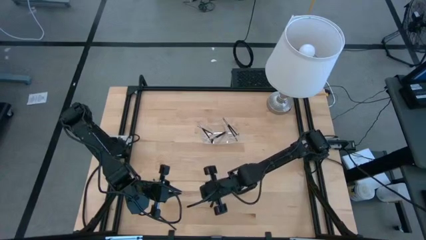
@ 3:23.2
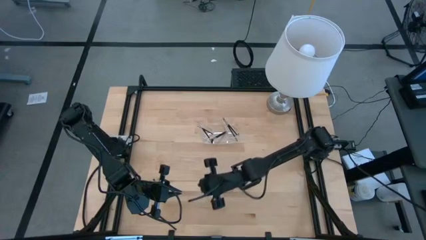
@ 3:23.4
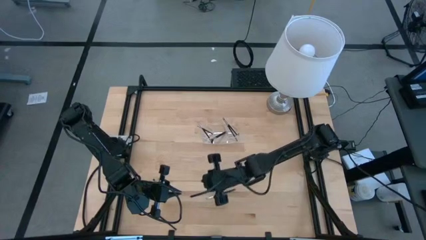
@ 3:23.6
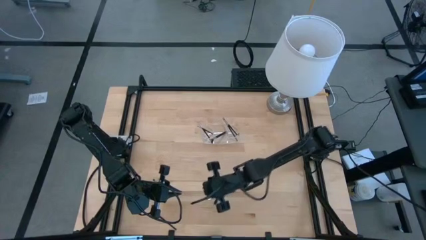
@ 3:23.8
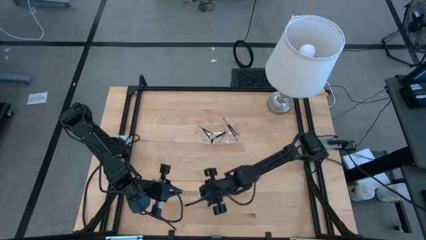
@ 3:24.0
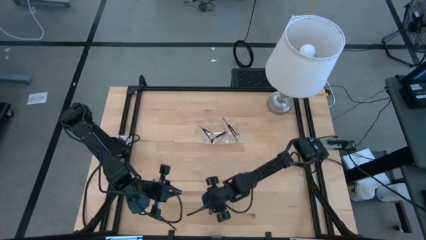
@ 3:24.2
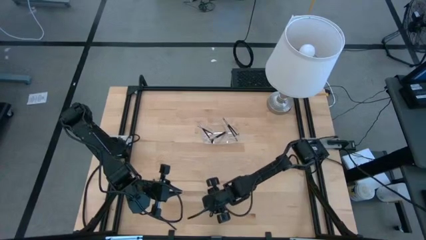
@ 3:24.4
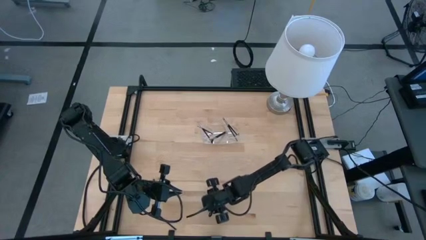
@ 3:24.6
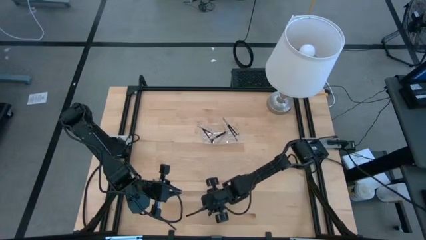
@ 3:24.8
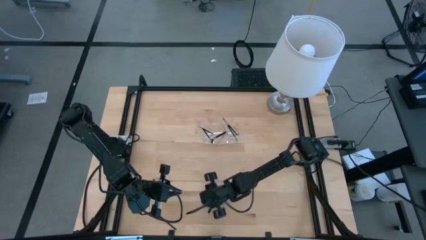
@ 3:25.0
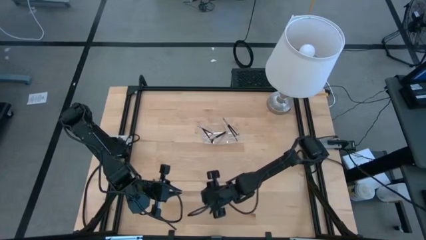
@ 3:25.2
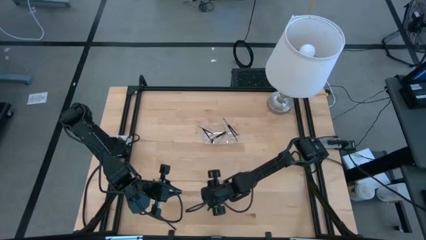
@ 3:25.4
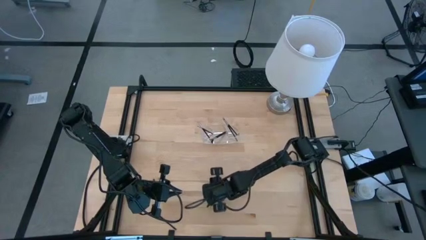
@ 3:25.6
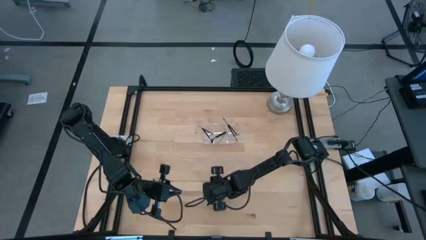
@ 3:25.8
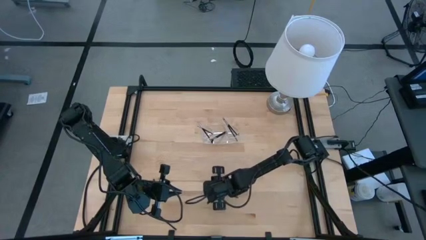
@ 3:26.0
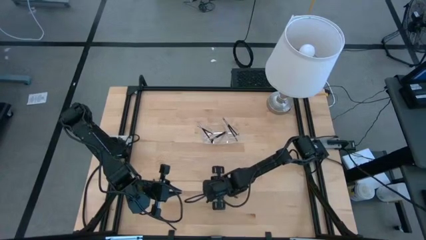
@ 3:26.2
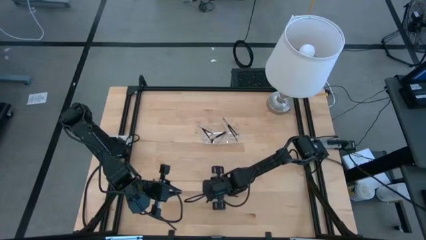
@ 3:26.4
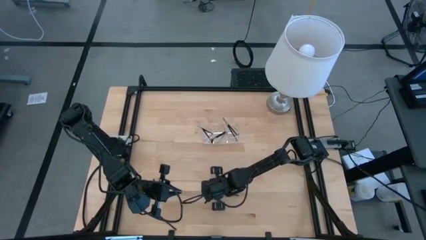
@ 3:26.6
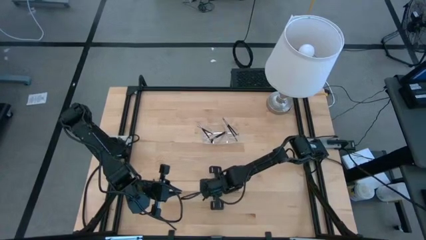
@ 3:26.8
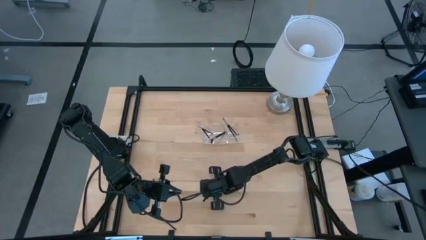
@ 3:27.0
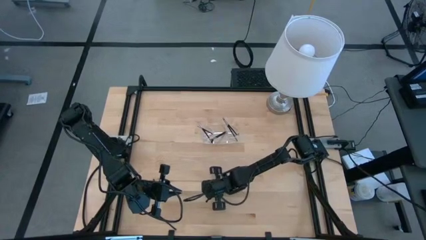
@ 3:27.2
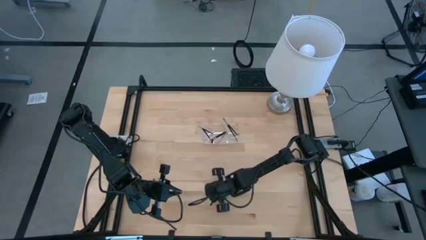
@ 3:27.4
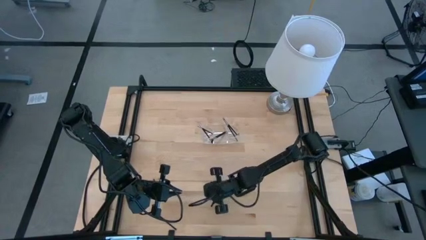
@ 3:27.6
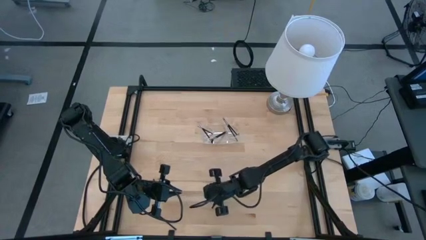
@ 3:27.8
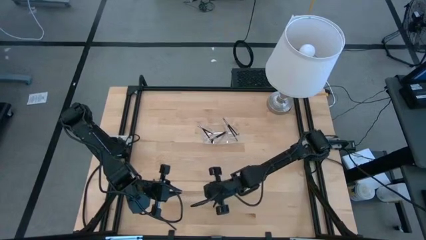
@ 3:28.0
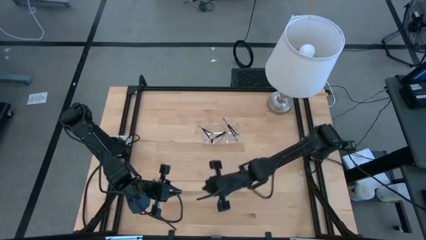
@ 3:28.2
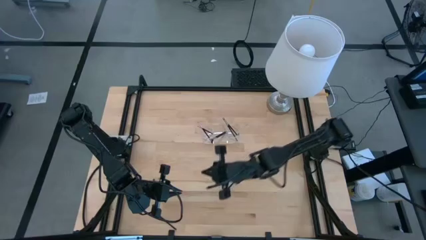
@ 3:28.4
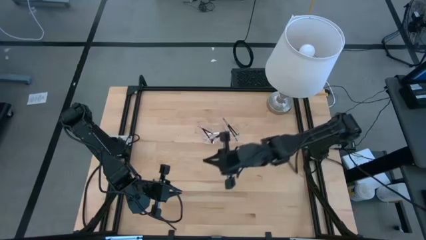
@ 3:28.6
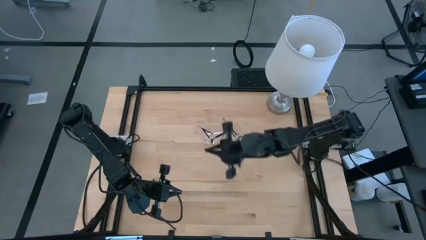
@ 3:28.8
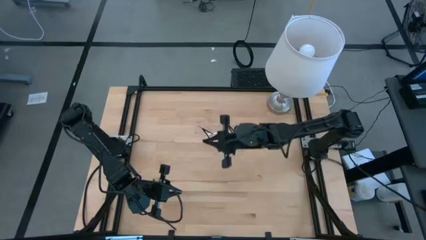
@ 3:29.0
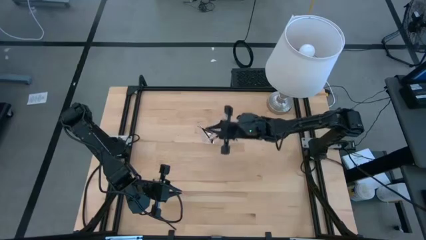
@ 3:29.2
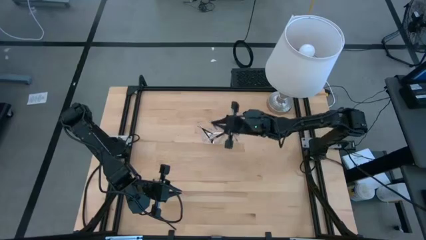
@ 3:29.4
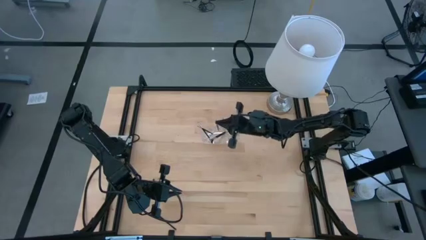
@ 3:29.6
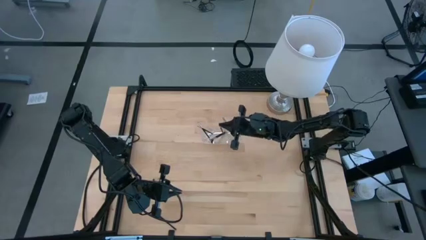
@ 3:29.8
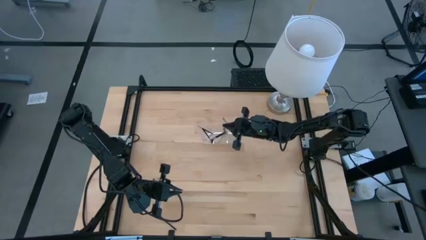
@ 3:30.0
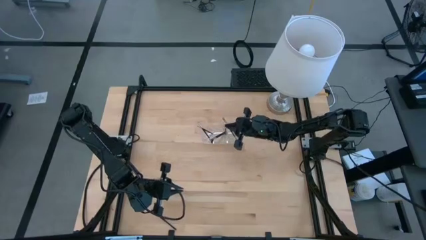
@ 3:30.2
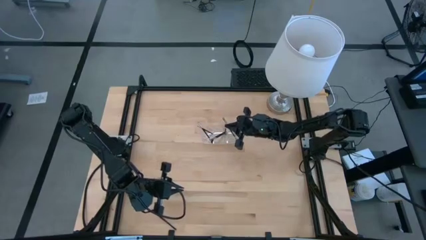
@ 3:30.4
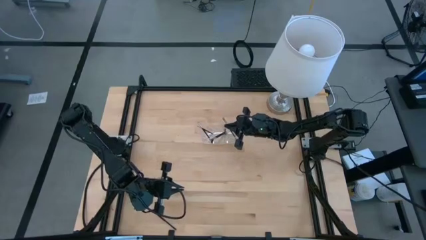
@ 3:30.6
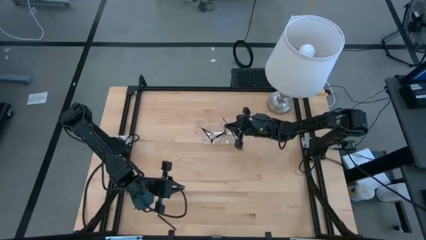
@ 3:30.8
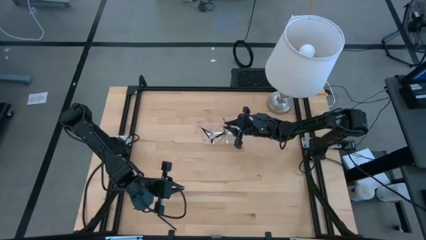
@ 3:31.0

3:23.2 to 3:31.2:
Task: Pick & Place Makeup Supplies
Put the makeup brush into the transparent organizer

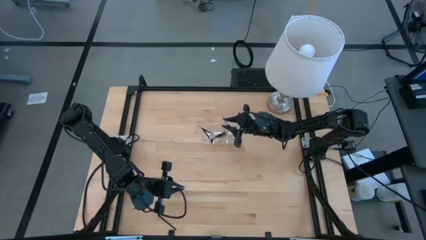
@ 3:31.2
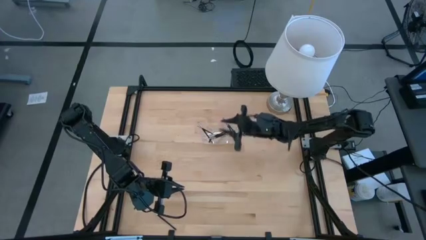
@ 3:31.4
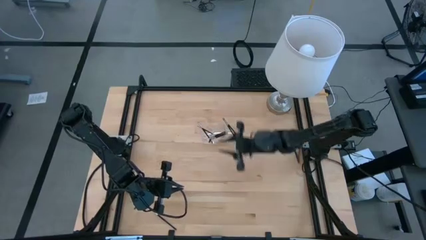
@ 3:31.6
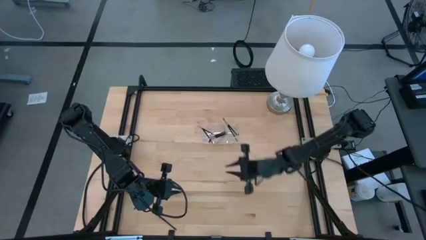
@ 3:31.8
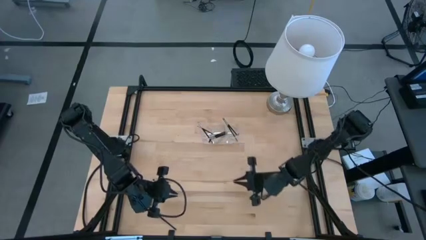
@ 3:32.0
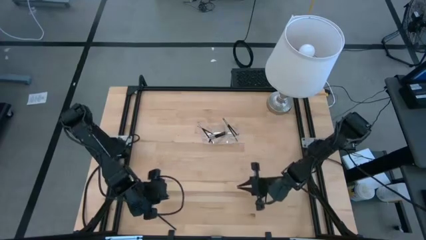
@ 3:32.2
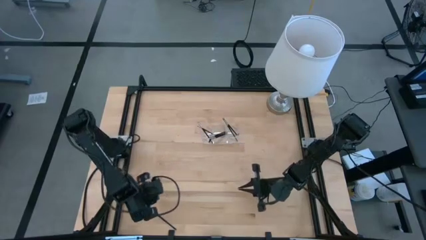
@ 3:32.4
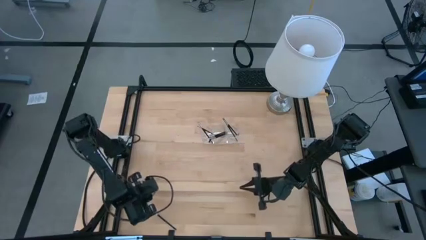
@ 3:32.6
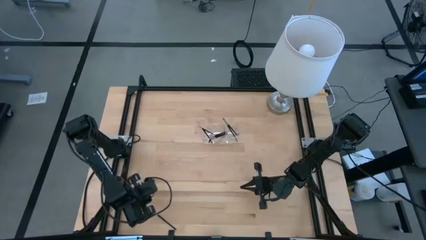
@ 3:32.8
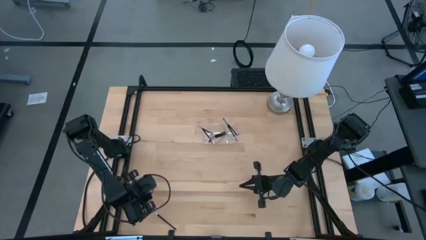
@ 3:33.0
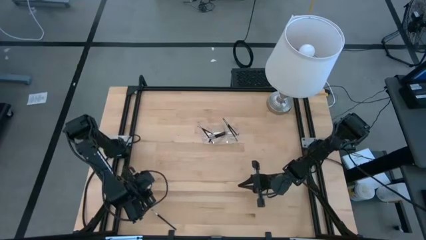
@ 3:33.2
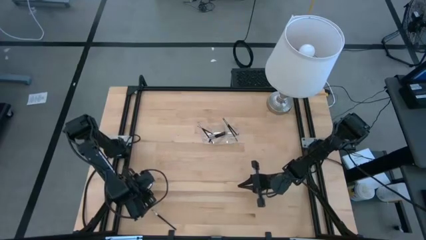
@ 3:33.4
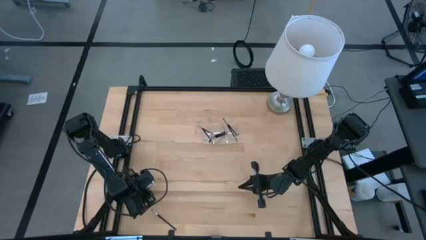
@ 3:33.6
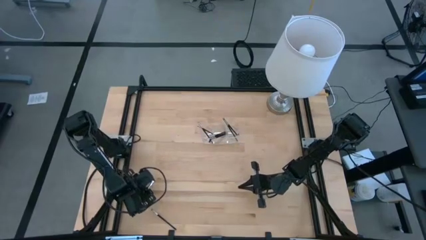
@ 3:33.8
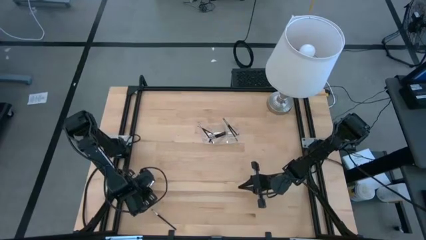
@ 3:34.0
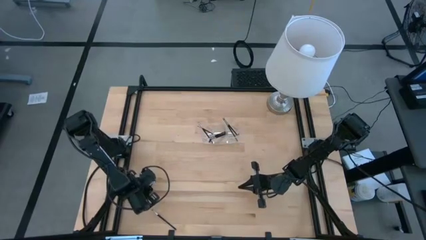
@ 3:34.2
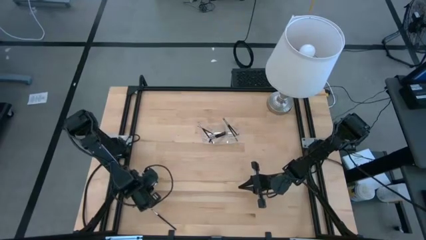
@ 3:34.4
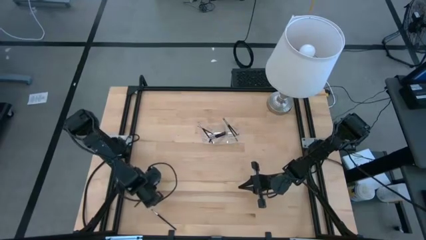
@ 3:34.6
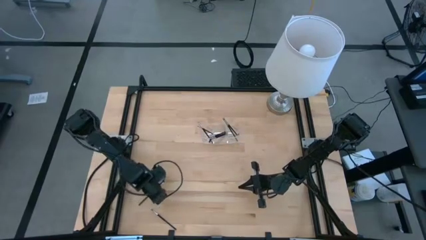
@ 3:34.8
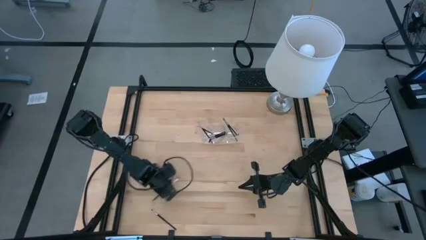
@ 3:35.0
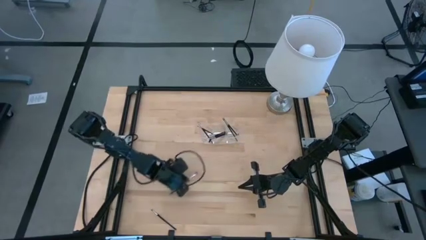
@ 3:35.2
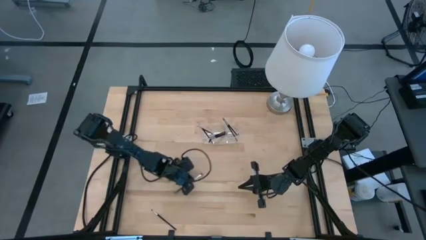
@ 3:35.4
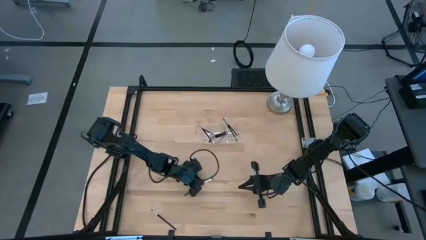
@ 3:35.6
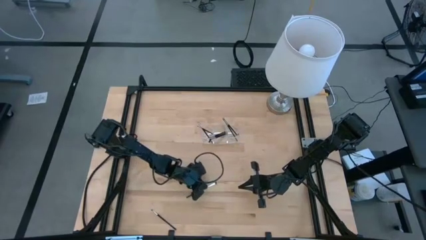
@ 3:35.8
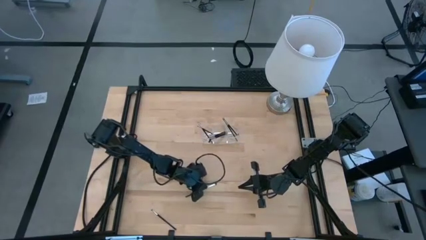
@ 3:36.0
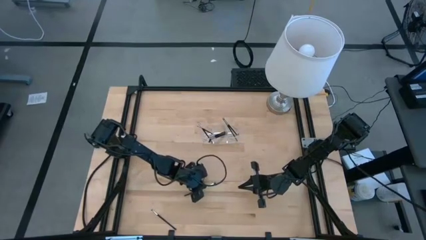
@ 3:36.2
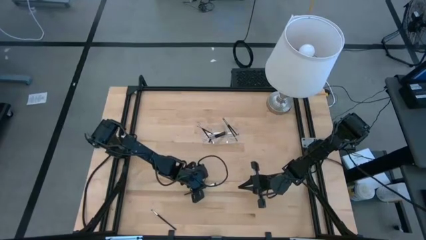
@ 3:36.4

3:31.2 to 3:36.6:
Put the makeup brush into the transparent organizer

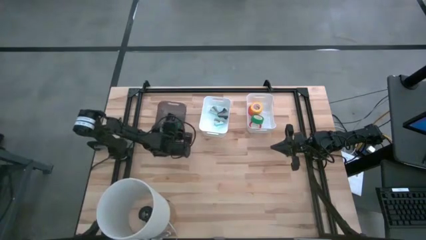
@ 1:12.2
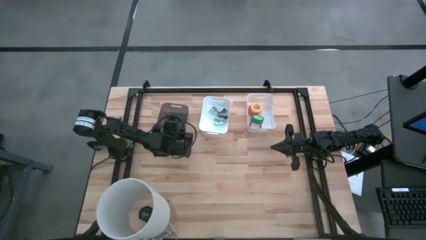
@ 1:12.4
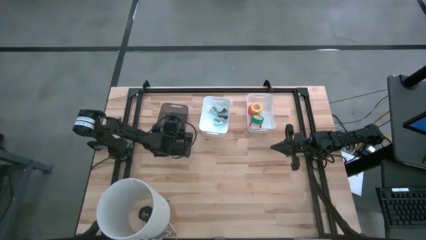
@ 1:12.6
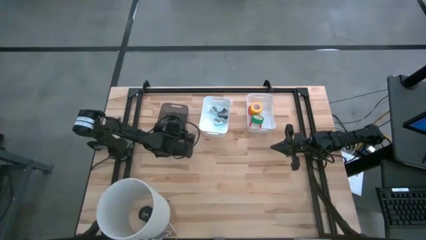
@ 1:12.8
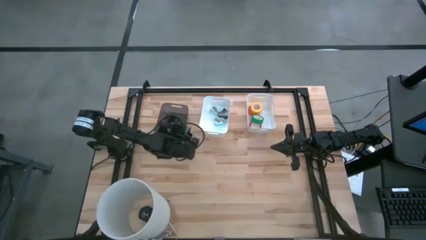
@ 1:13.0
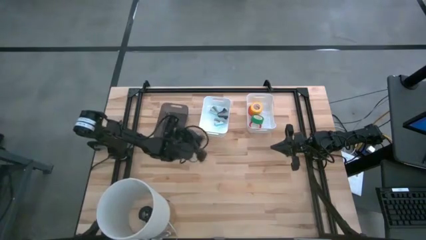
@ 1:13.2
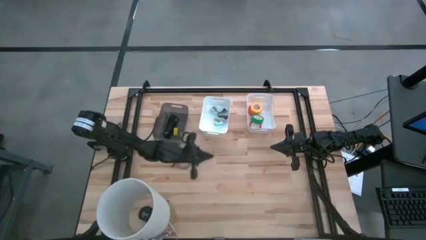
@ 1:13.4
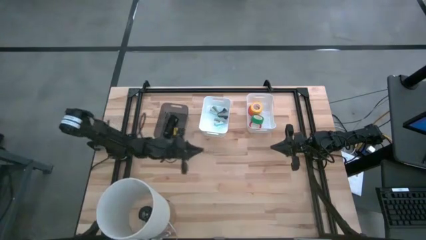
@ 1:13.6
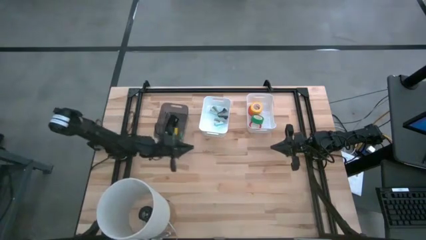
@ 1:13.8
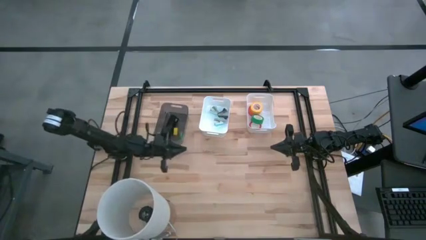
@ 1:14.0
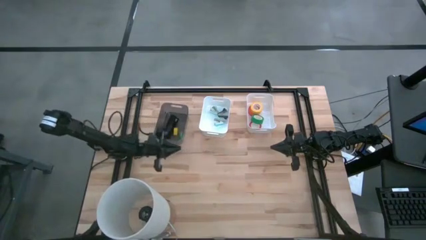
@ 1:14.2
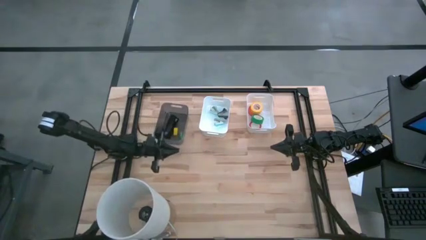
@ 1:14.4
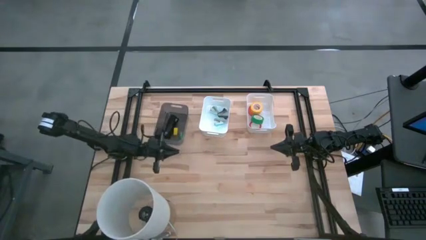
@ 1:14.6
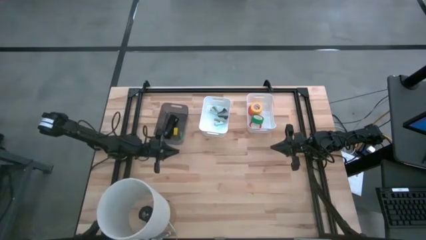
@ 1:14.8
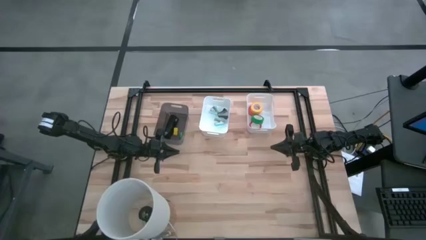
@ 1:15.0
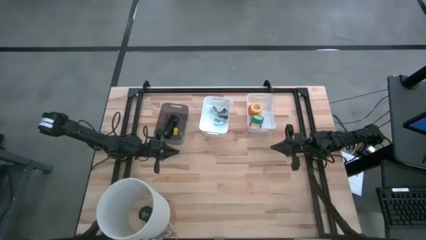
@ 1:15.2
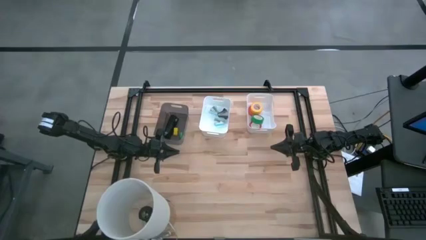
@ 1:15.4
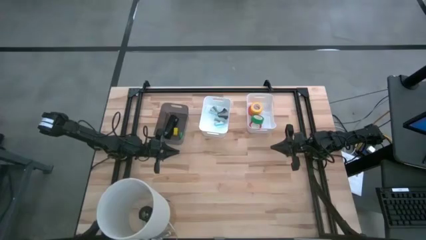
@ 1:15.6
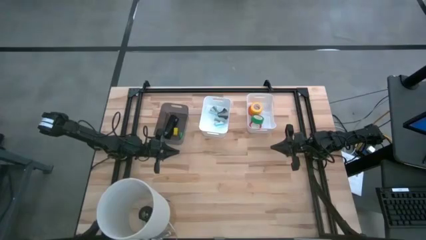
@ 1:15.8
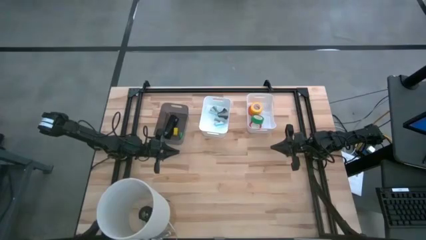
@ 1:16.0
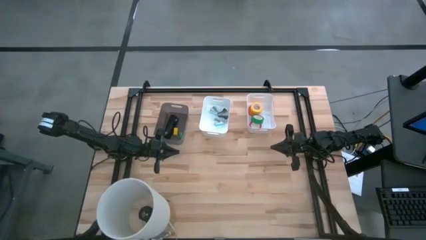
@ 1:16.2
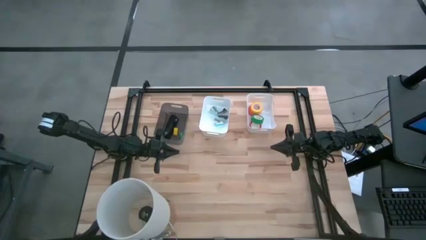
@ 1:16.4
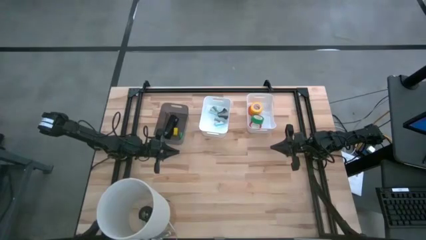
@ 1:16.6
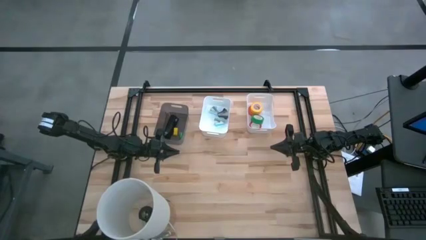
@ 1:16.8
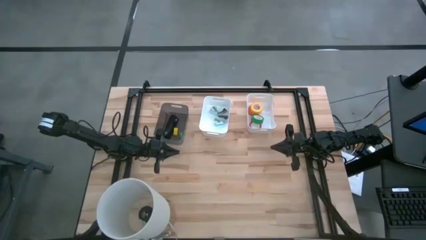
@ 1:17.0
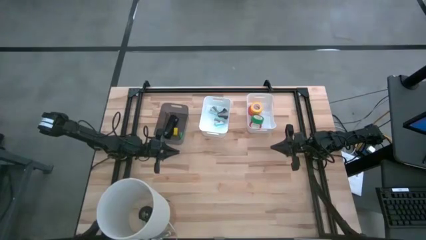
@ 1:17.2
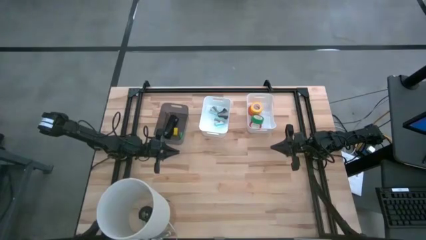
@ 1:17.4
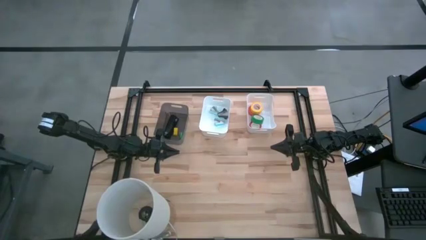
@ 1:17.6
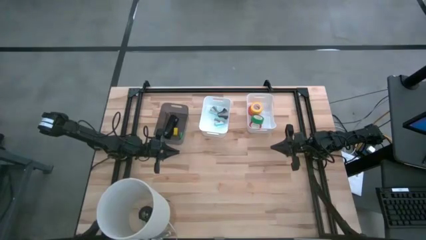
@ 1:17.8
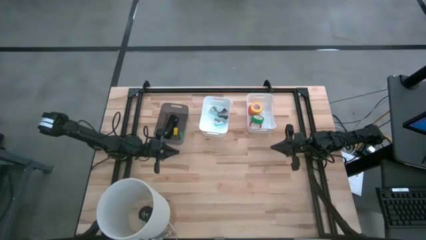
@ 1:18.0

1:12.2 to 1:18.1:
Task: Pick and place Stapler, Stapler remover, tape
Return to Home Position
